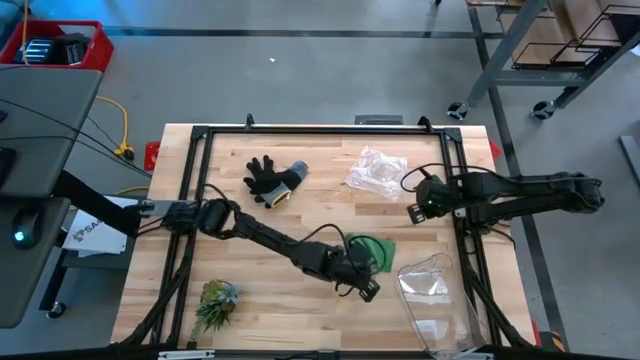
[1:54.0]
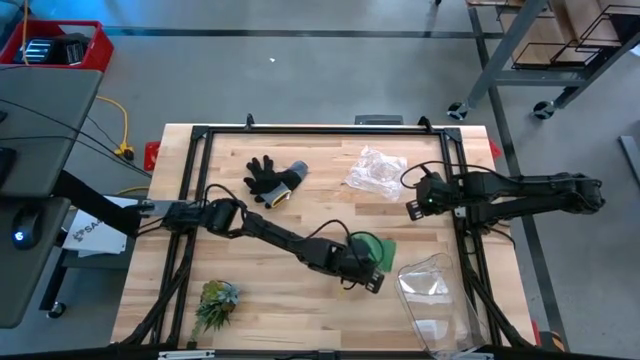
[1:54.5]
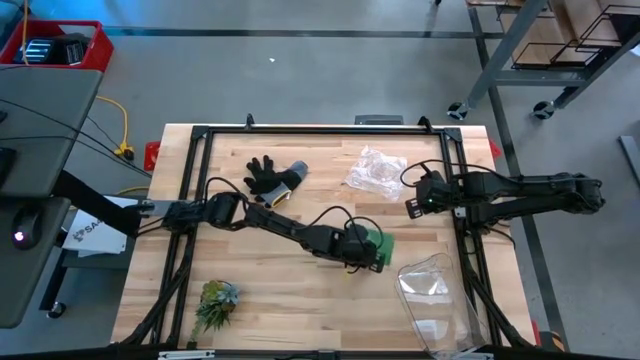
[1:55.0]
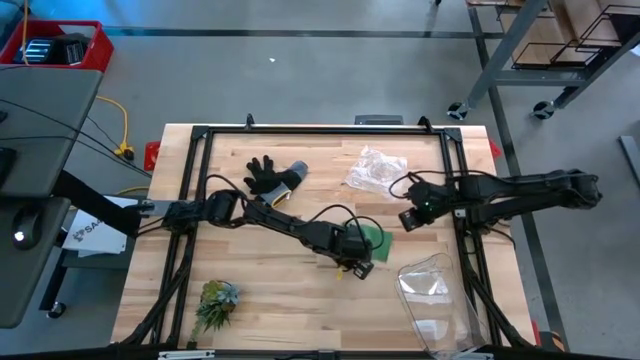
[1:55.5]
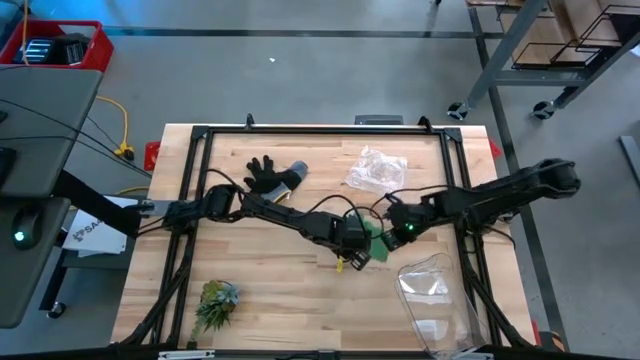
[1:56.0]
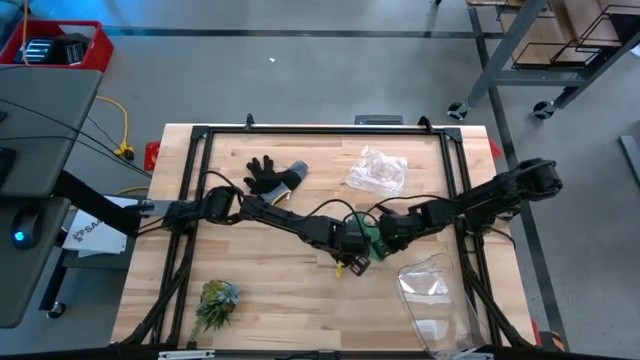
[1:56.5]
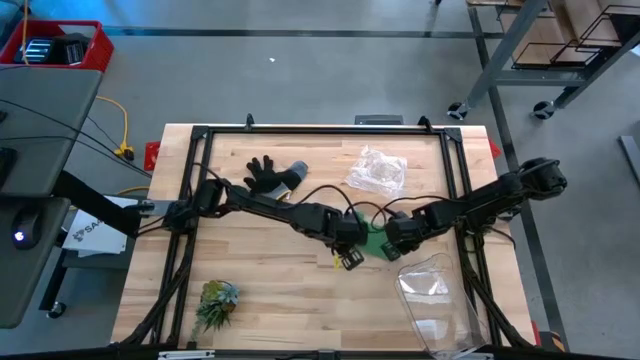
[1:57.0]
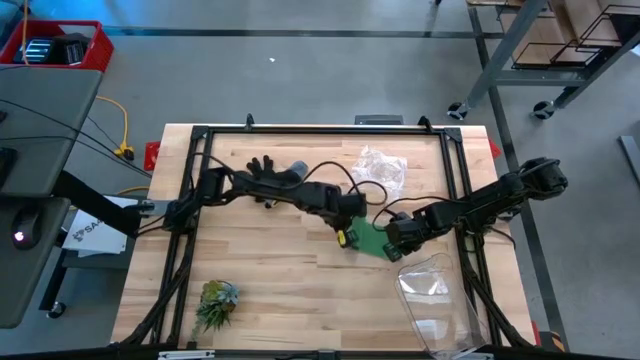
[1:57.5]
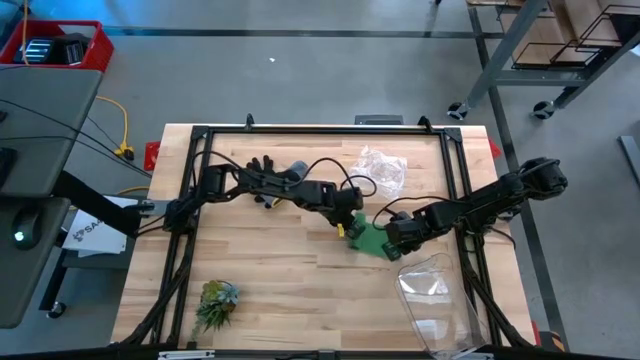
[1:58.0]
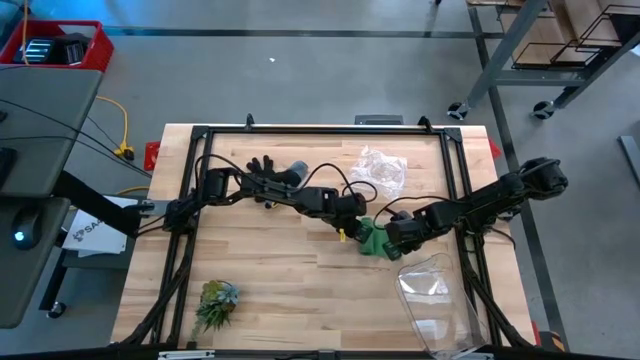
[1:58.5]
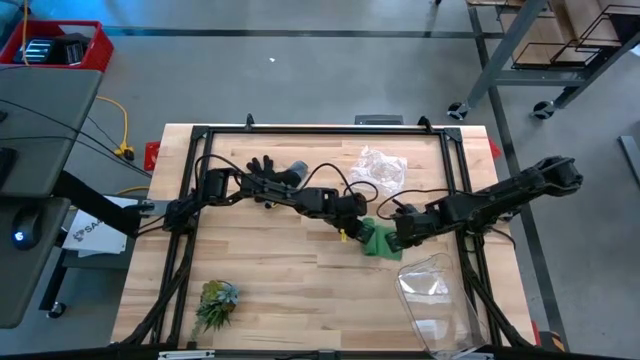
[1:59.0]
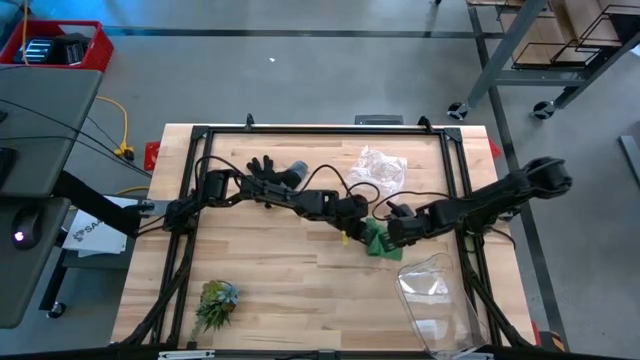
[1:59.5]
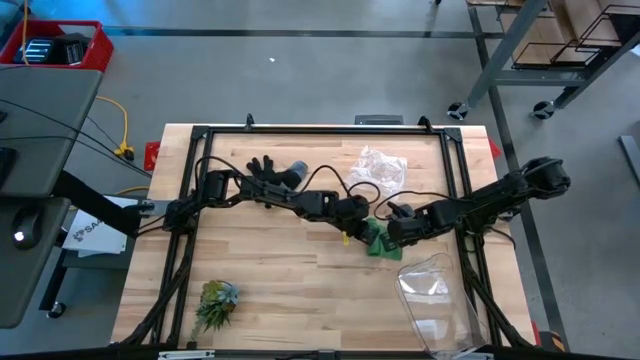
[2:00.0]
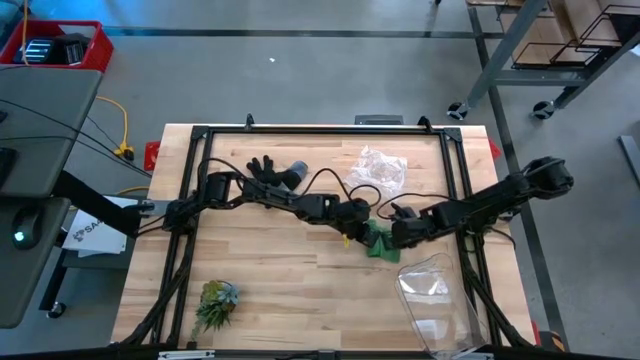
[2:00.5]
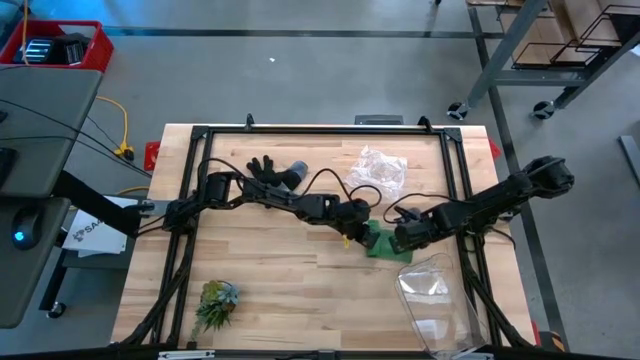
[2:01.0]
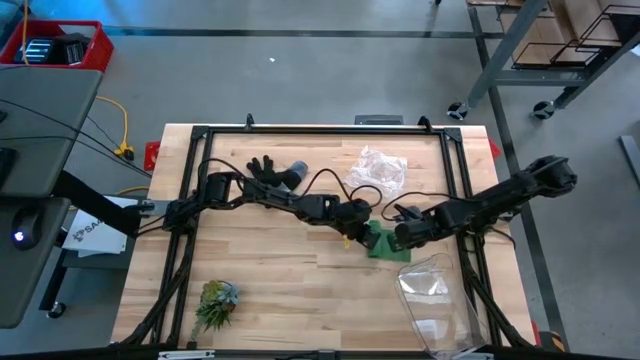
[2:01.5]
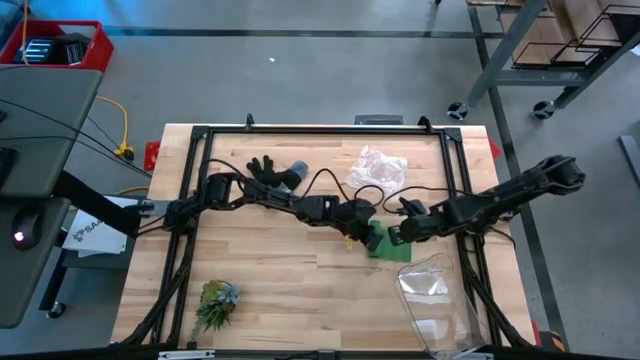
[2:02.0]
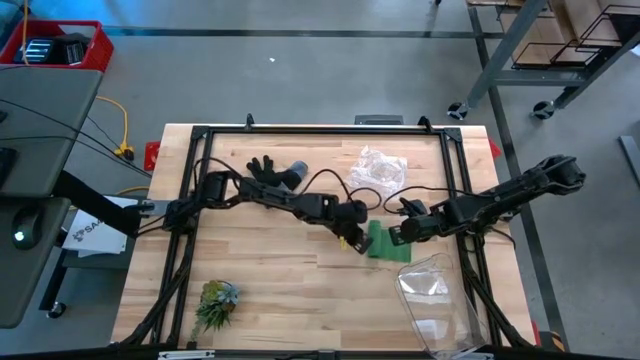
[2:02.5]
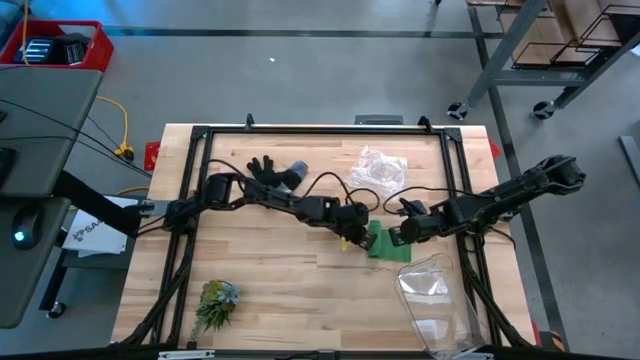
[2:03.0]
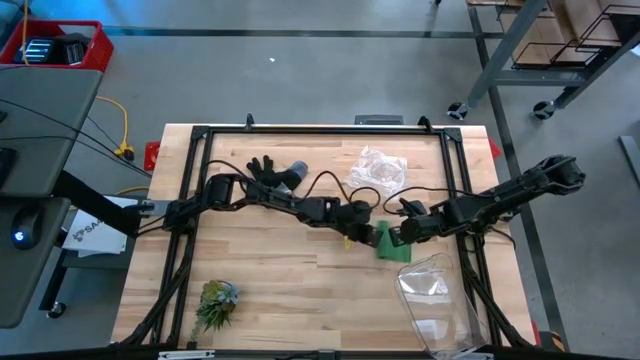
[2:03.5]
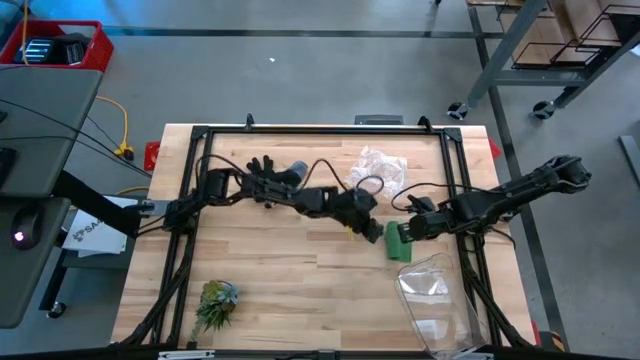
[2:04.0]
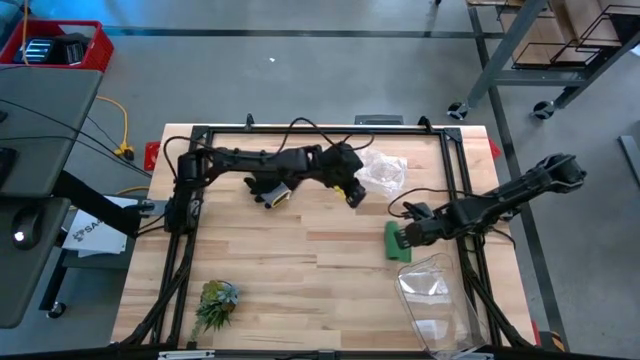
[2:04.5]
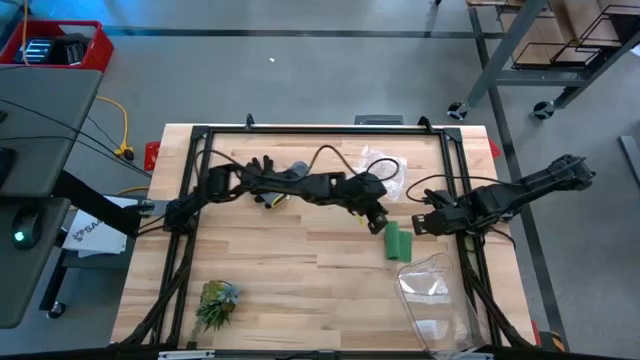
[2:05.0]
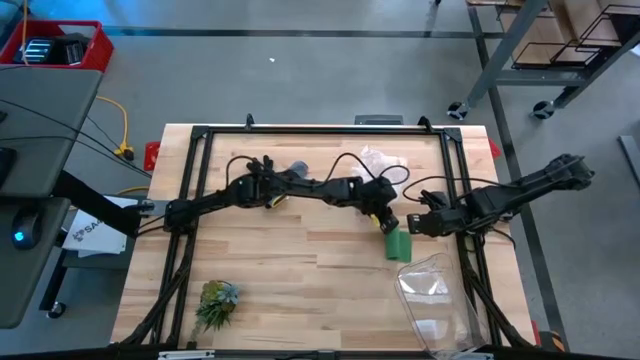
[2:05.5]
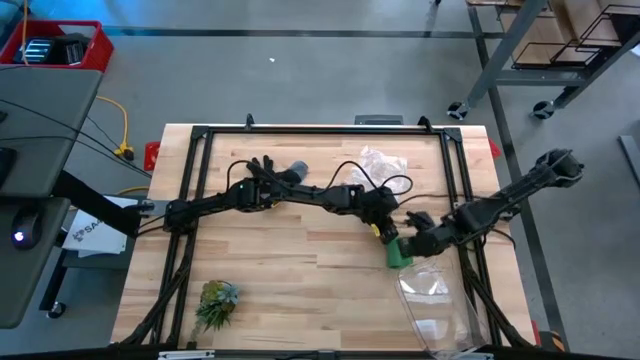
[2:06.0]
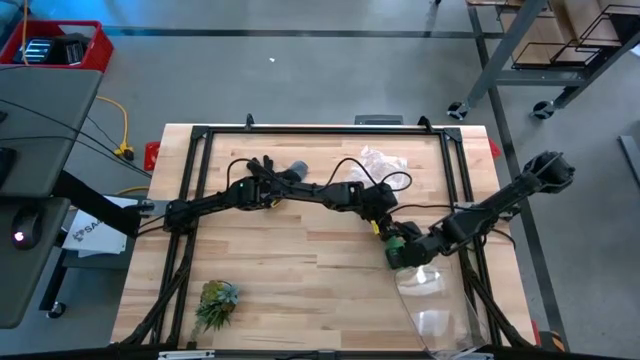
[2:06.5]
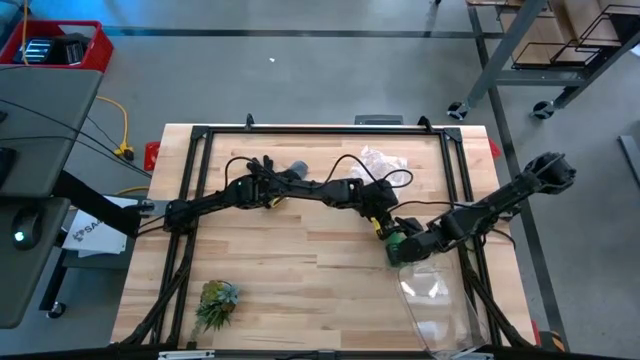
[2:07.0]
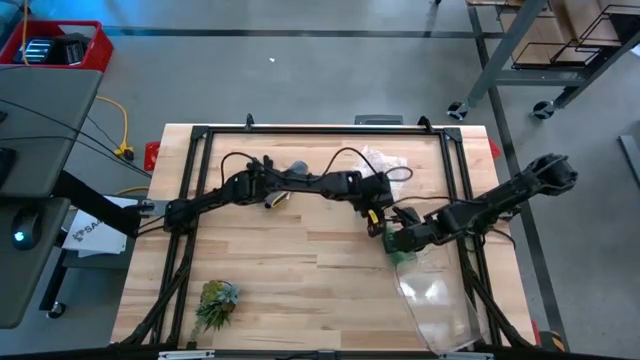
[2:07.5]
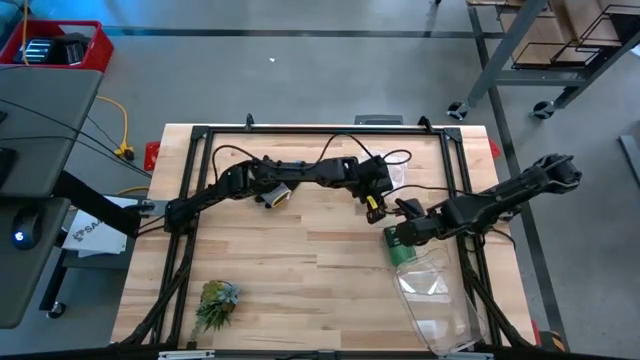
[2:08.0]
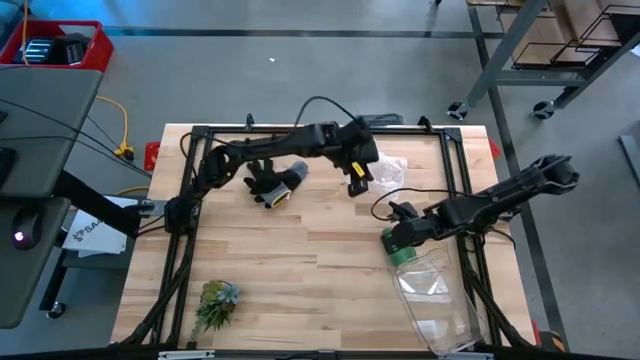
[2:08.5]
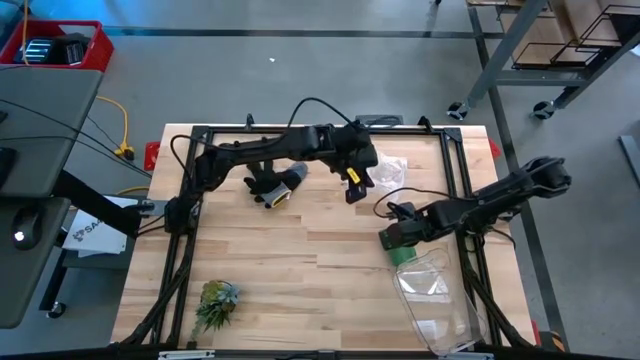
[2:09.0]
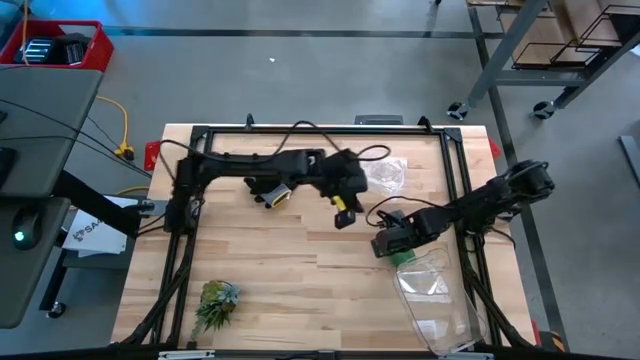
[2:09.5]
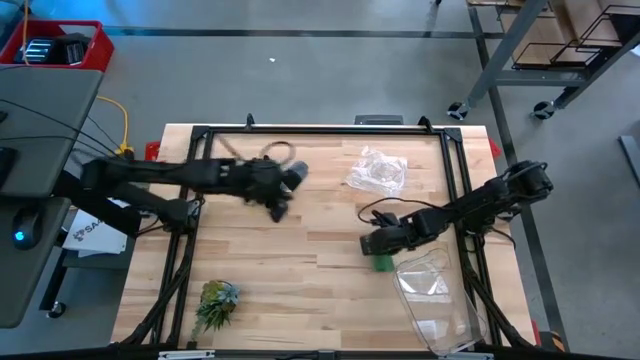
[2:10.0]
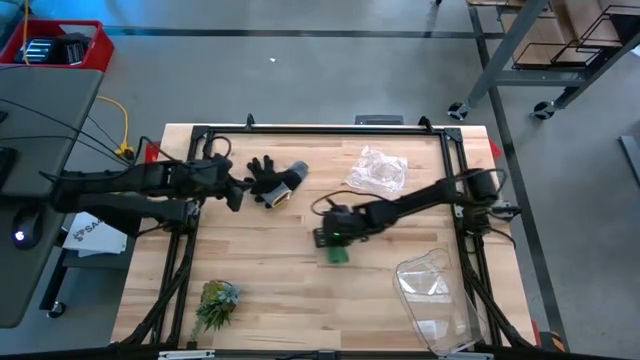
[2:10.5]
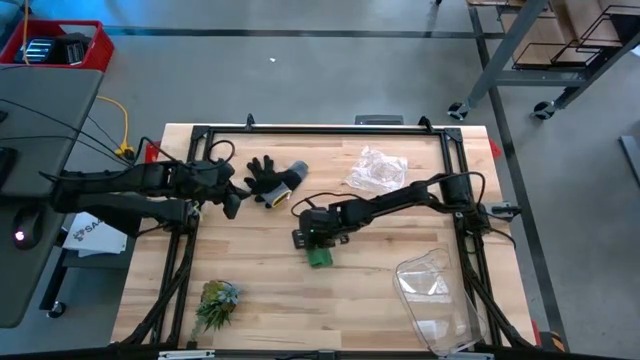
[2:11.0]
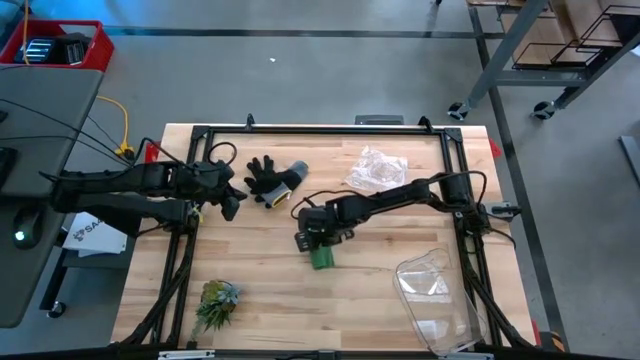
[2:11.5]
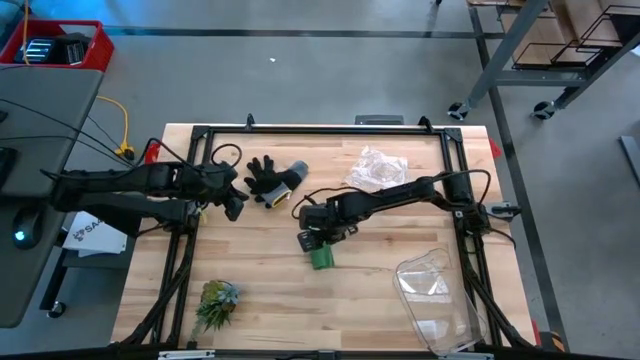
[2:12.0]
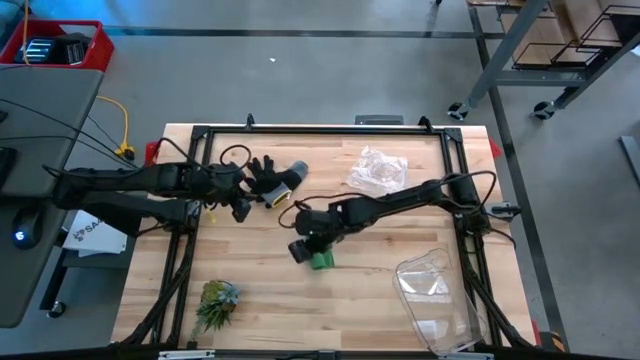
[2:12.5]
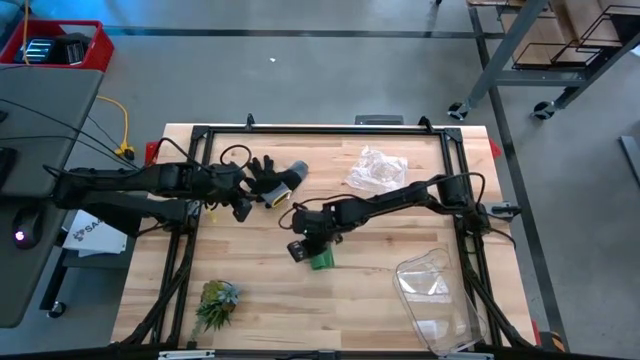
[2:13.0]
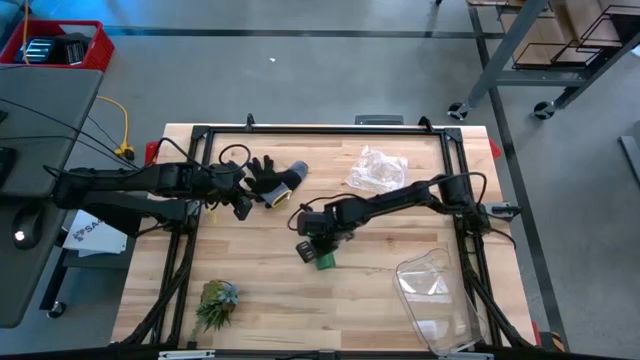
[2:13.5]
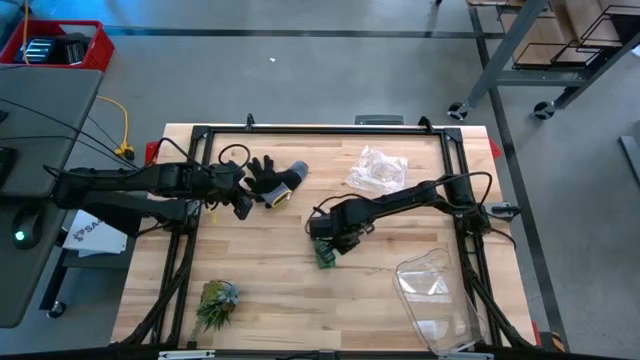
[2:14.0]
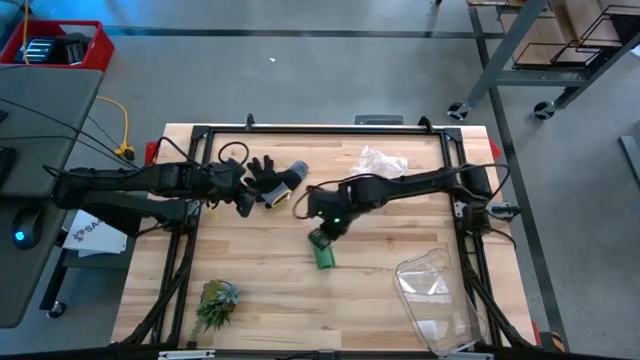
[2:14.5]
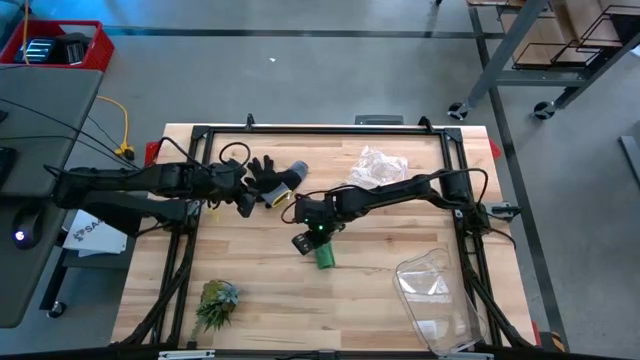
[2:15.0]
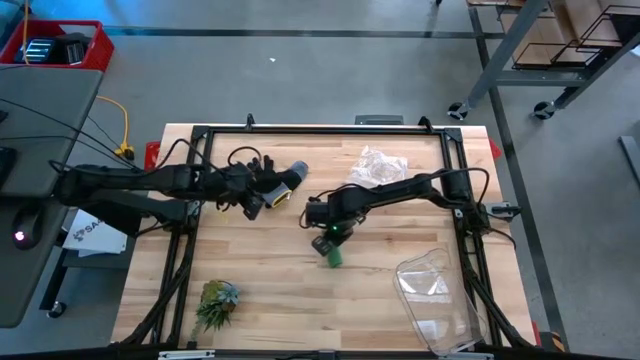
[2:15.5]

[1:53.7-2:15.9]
Task: Roll bandage
Roll the green bandage
